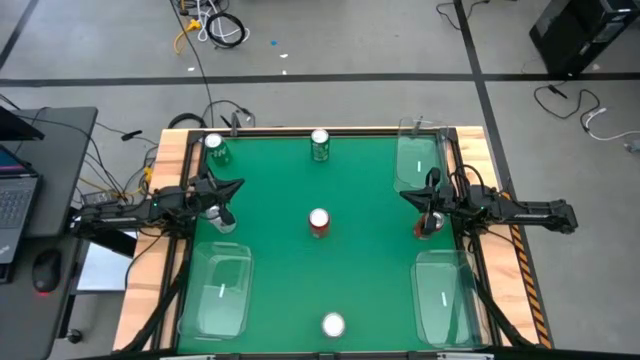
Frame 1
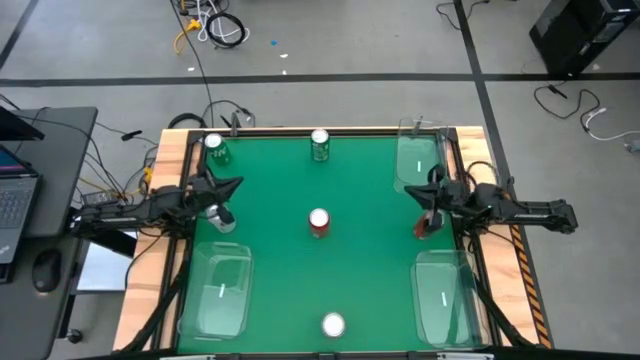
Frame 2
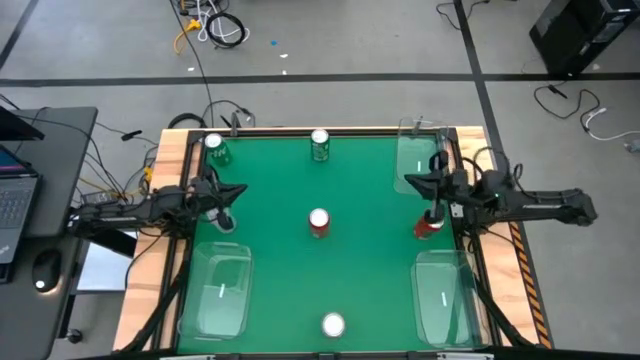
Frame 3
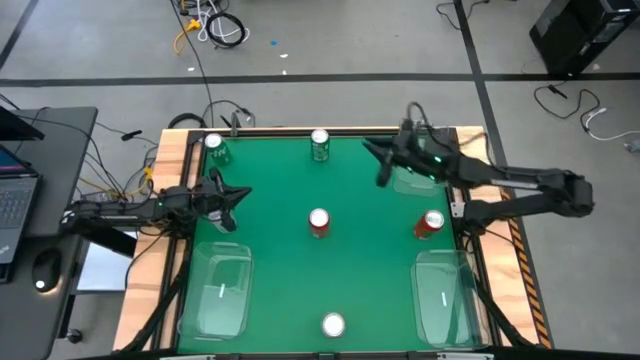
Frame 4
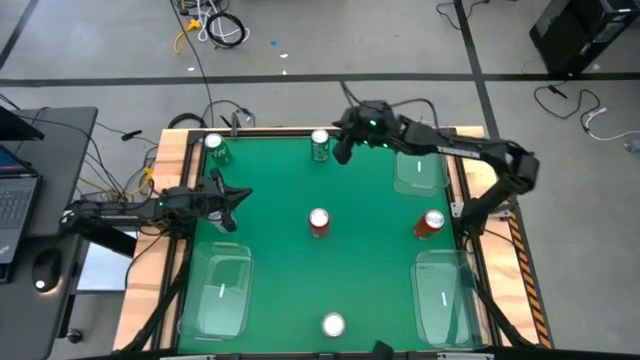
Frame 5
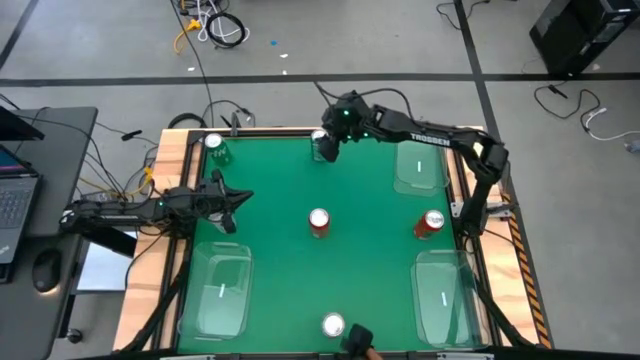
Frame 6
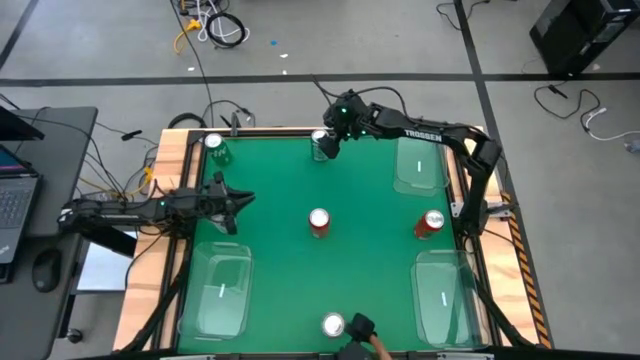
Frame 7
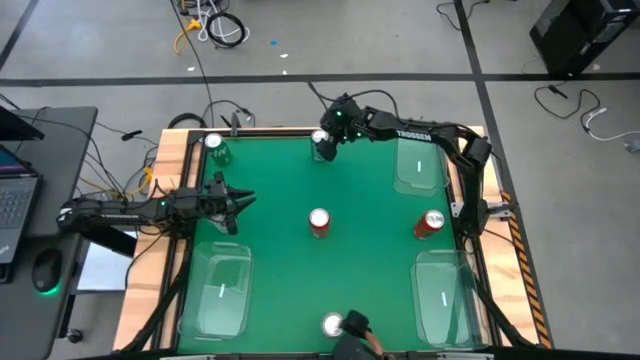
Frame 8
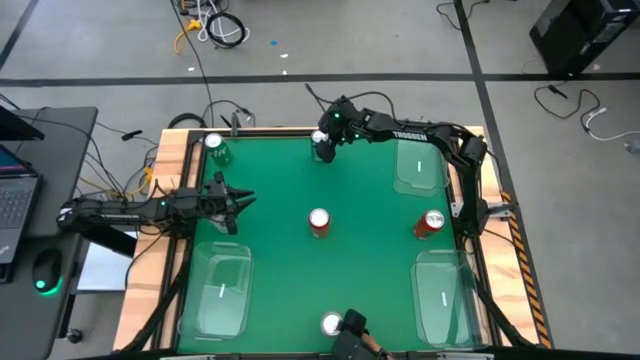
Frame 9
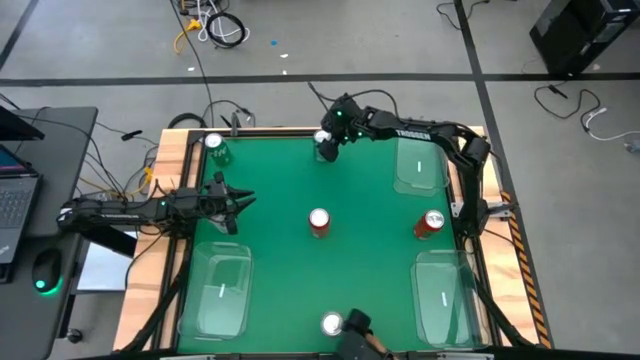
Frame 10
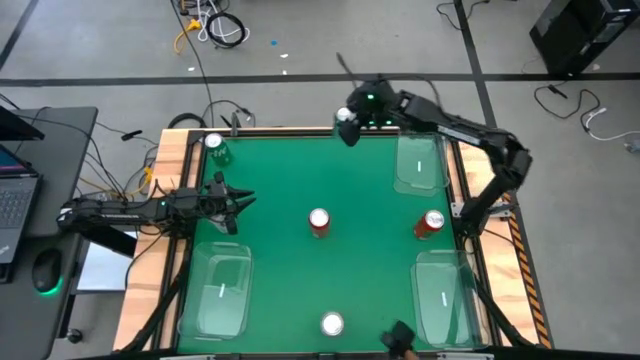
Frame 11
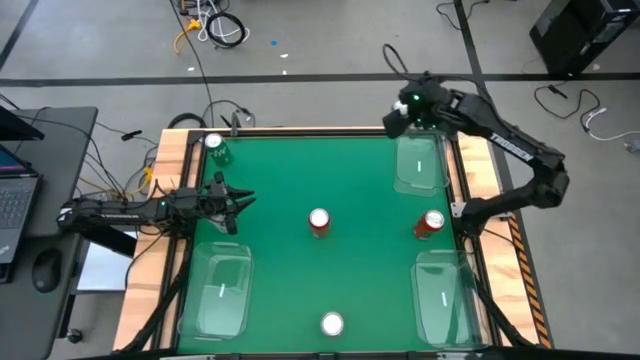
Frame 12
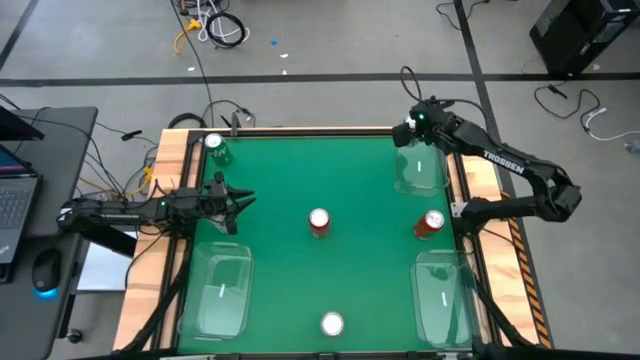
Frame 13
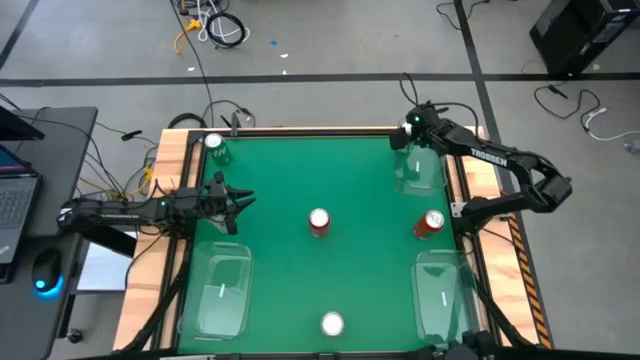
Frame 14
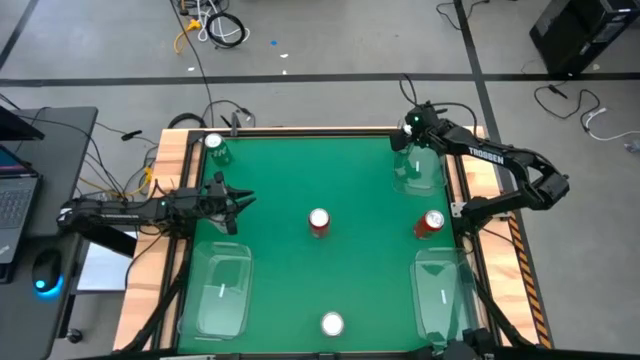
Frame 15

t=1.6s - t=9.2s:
Task: Sort soda cans
Put the right green soda can into the top transparent bin

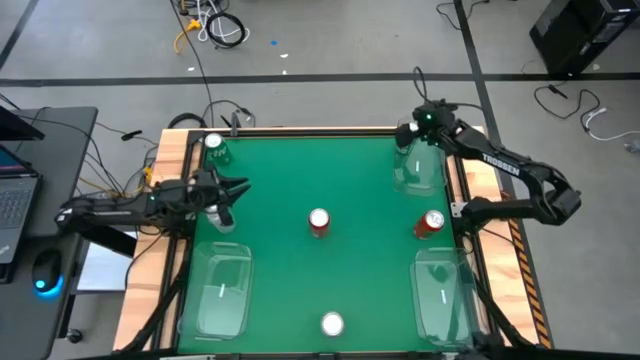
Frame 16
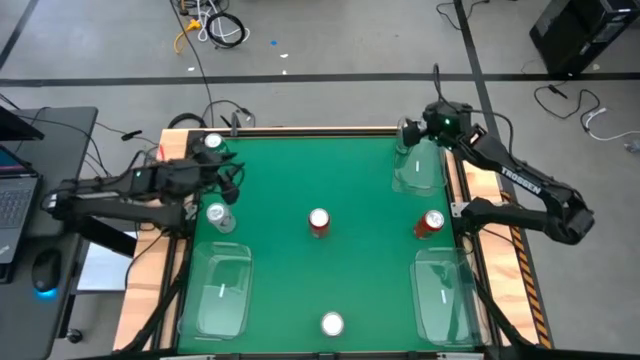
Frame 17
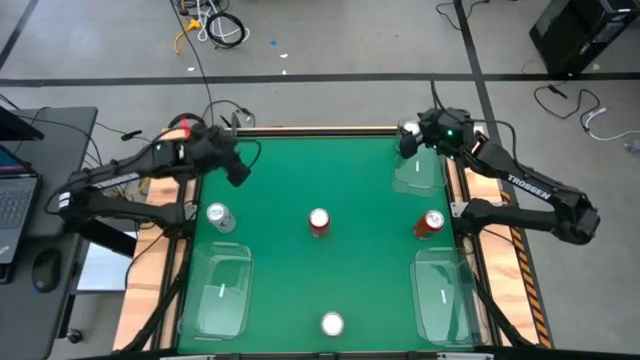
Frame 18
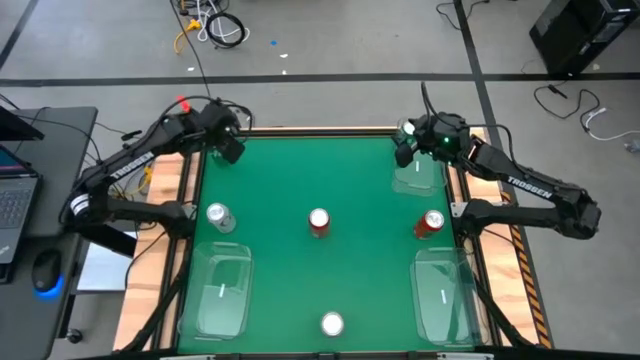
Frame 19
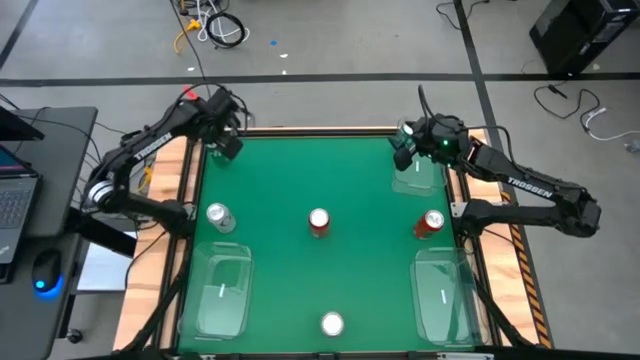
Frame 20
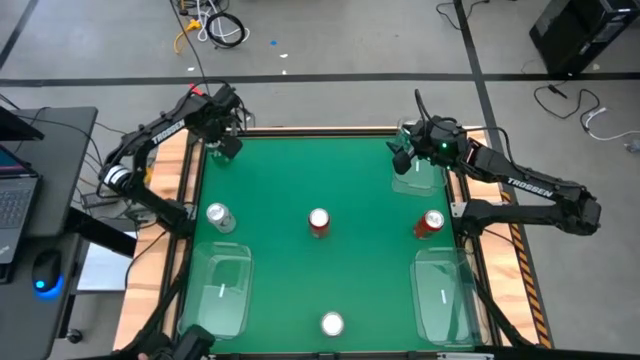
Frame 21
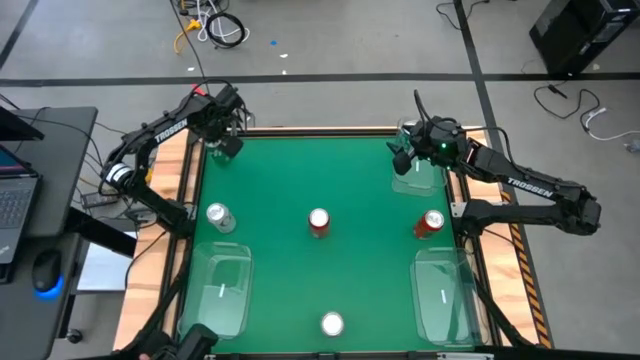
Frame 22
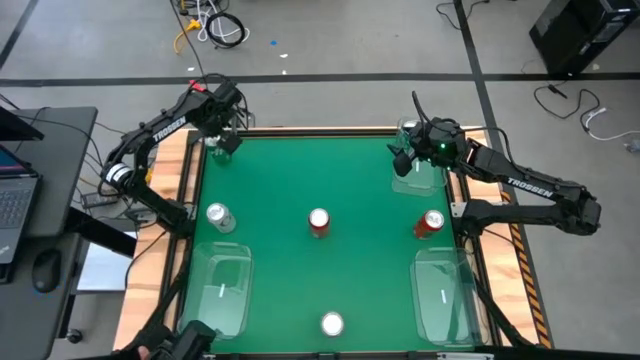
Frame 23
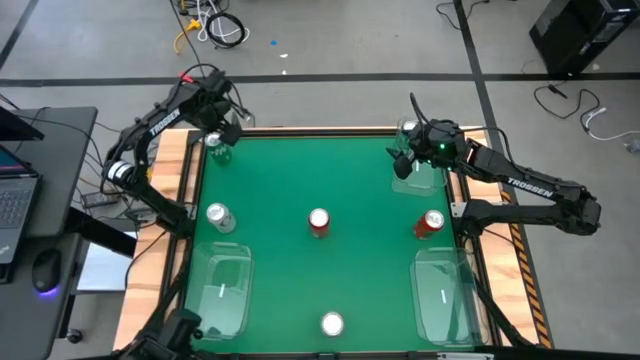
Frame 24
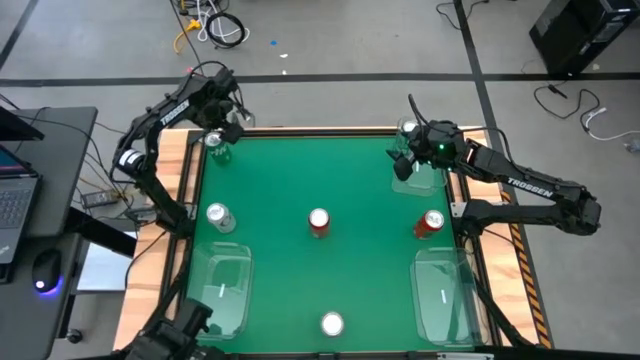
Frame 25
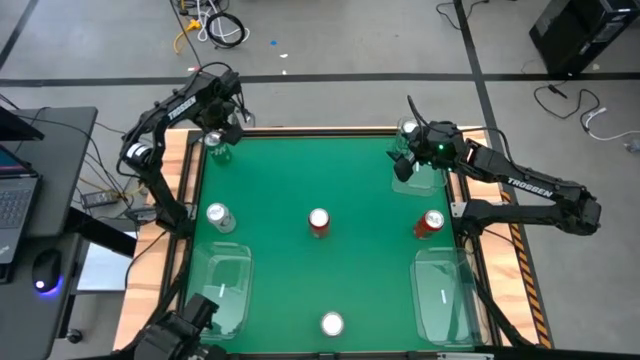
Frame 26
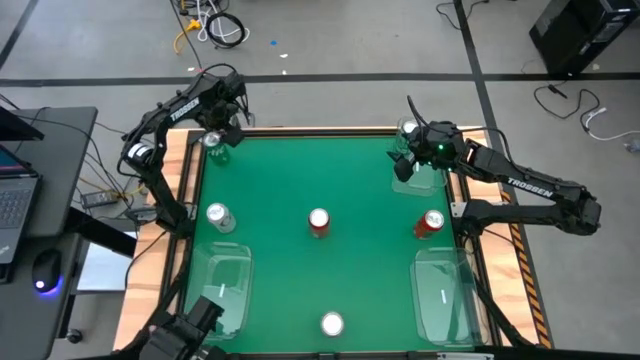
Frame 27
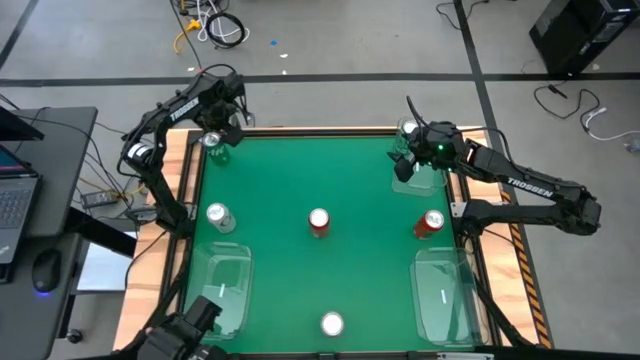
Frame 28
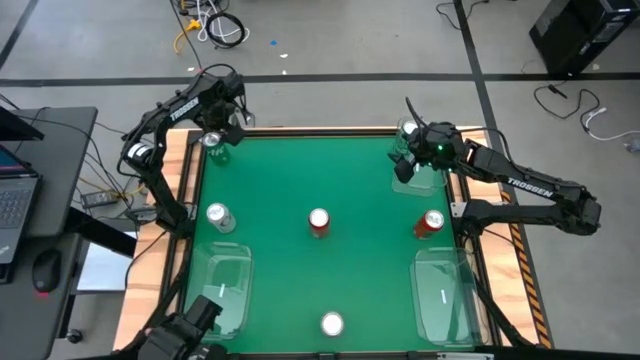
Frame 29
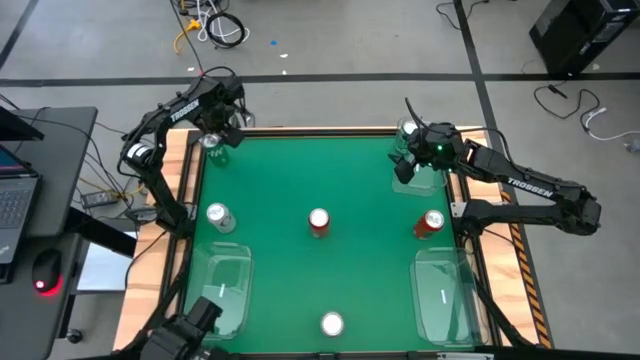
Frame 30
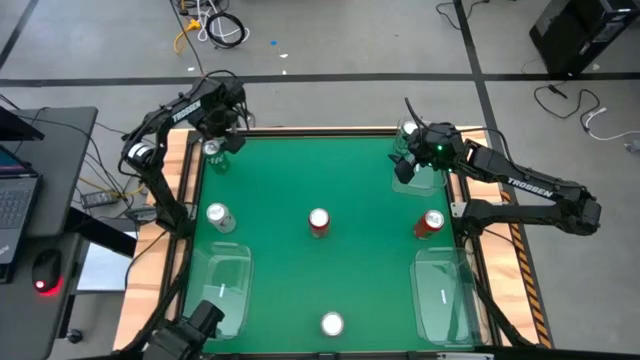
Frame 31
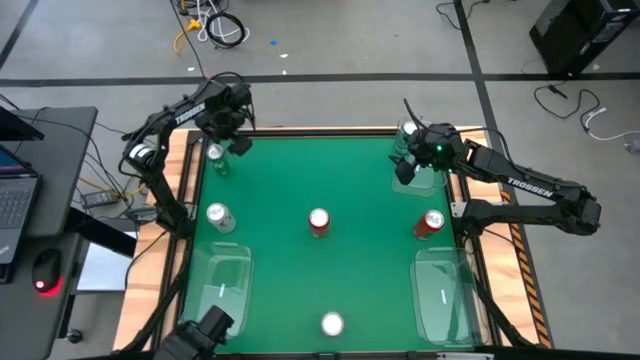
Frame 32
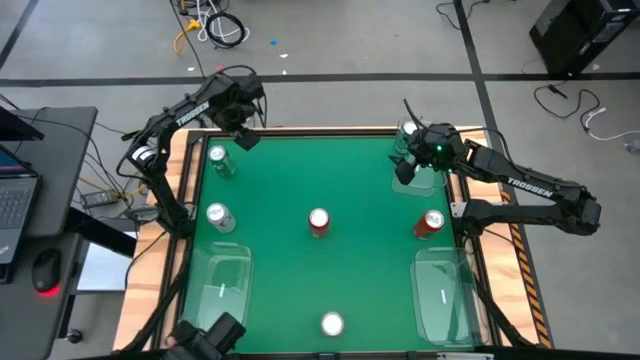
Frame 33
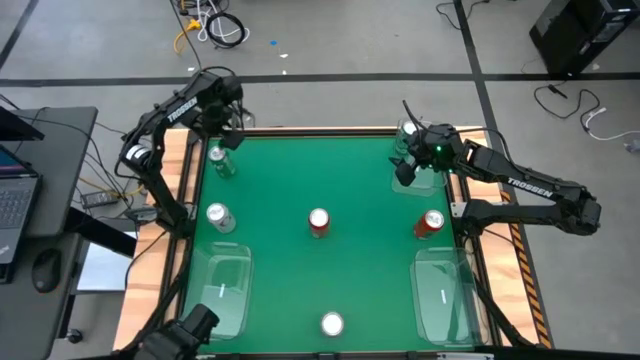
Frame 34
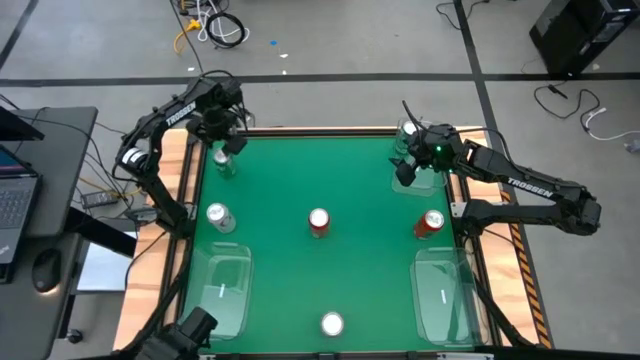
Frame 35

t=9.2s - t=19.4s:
Put the left green soda can into the top transparent bin

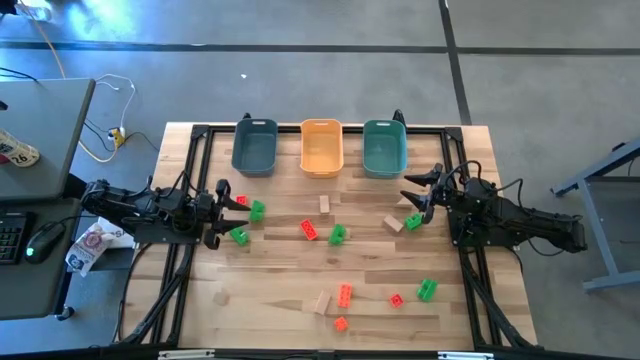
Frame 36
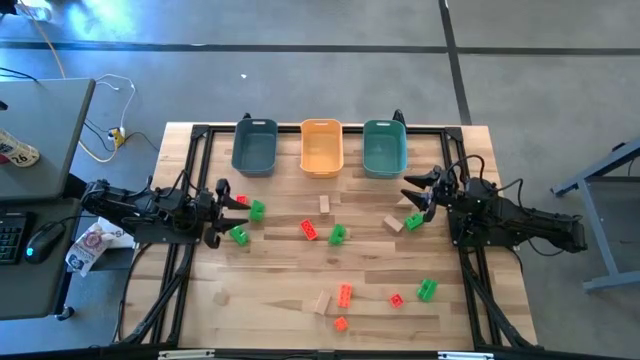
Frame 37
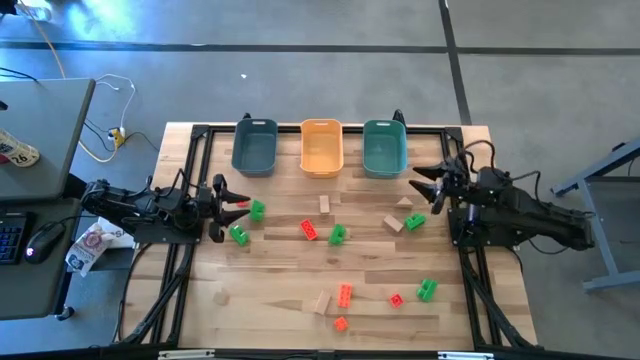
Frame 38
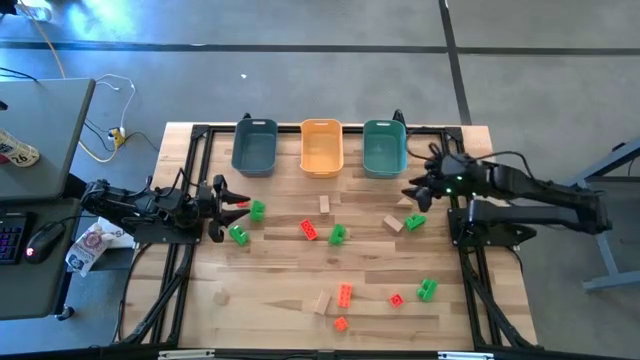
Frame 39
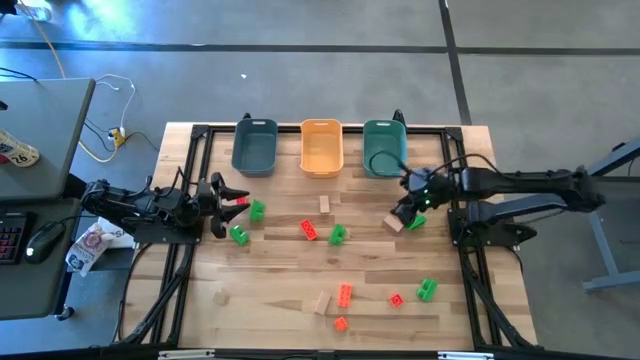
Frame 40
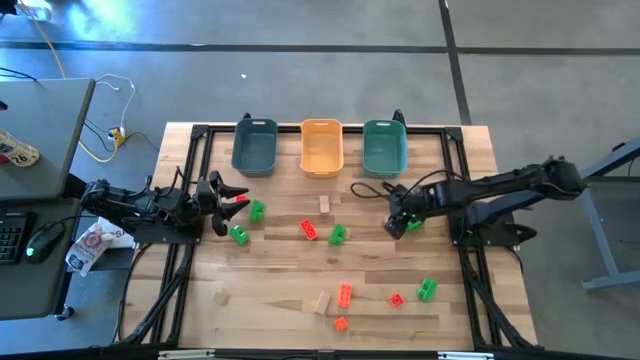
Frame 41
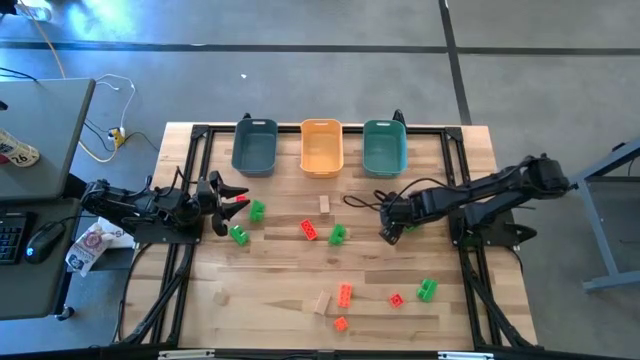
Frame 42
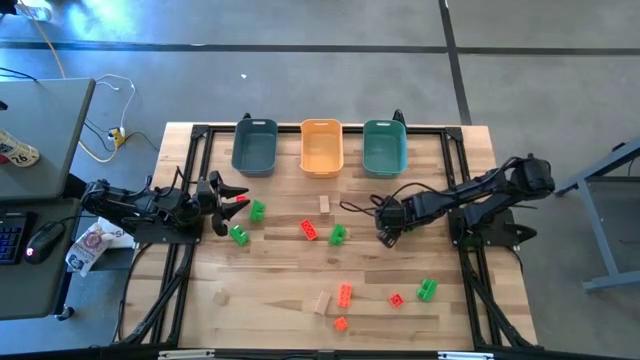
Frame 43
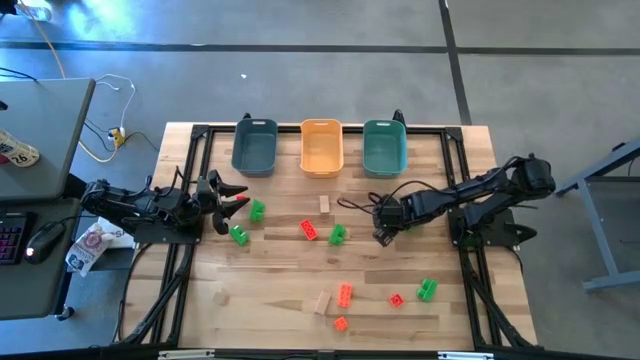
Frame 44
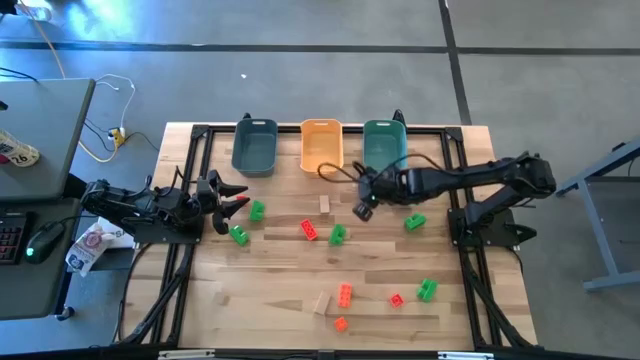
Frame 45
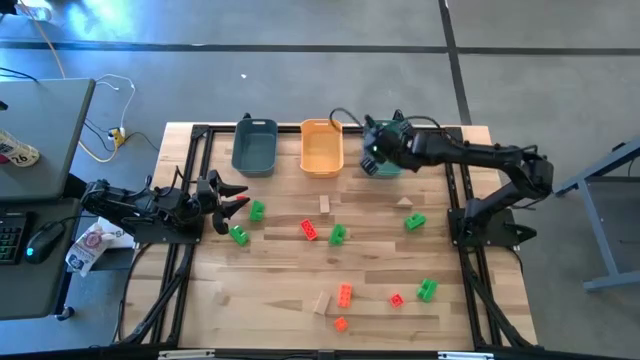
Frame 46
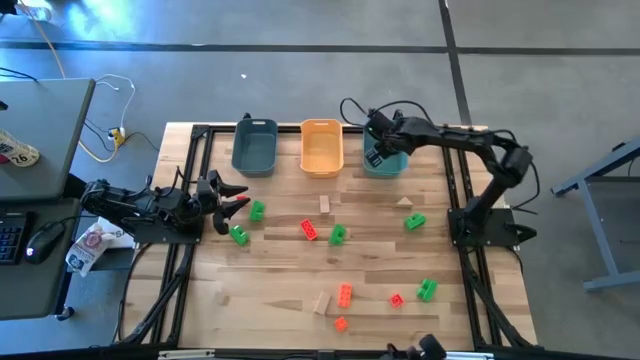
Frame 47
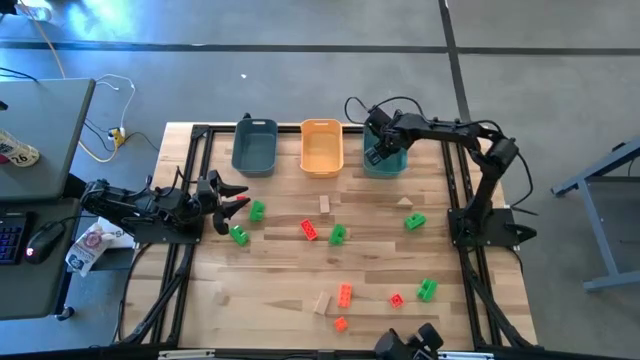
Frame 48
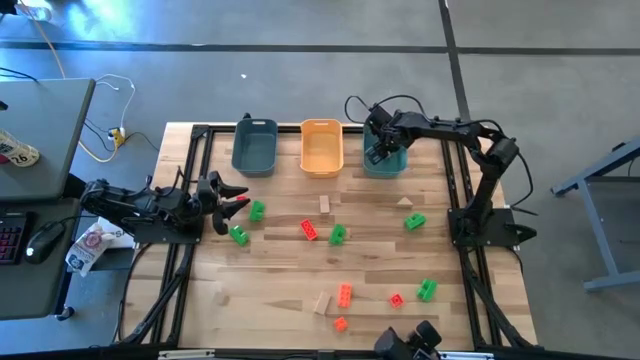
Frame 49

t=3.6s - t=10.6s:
Task: Sort & place blocks by color
Put the brown block into the green bin
